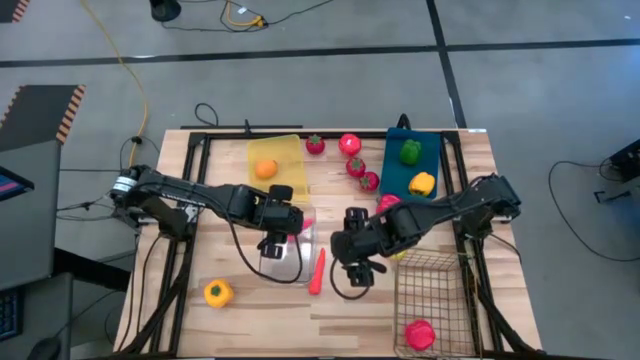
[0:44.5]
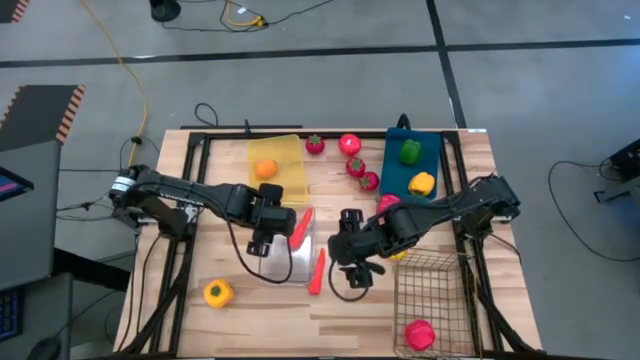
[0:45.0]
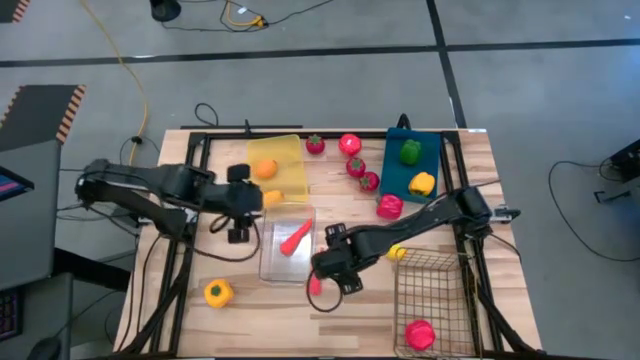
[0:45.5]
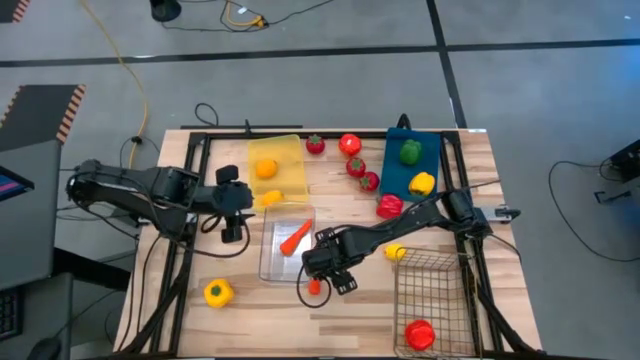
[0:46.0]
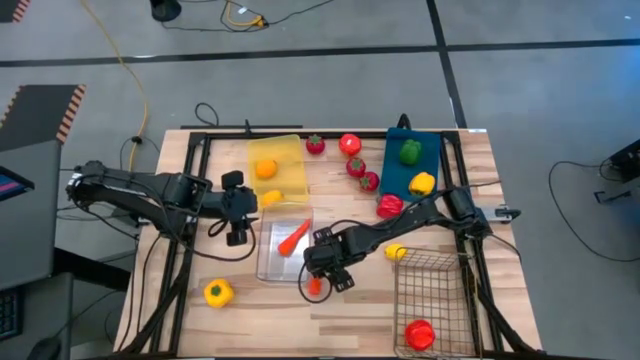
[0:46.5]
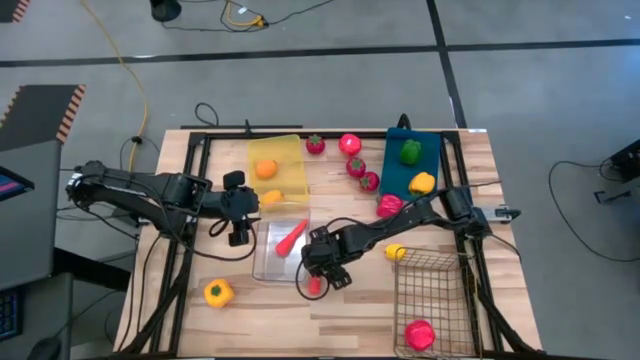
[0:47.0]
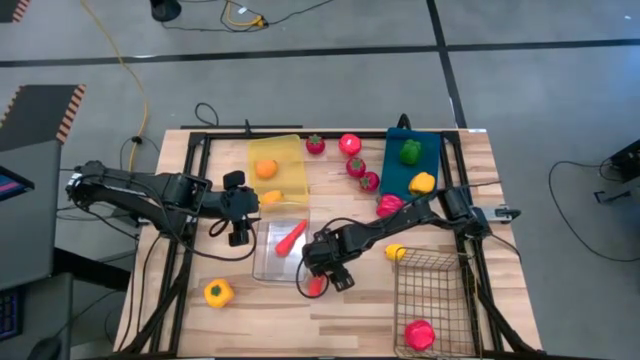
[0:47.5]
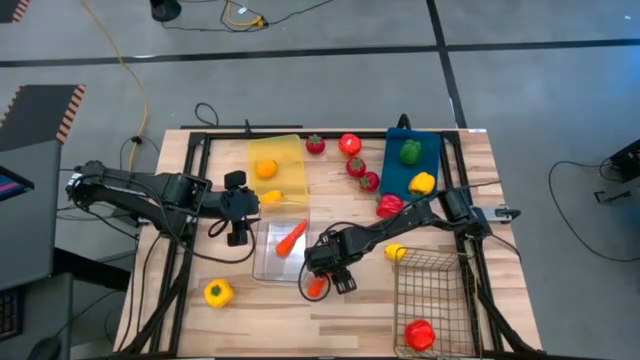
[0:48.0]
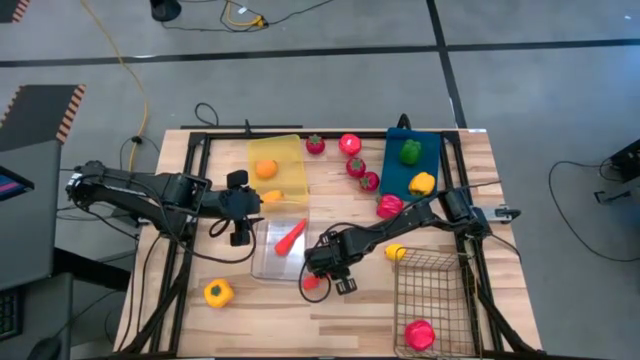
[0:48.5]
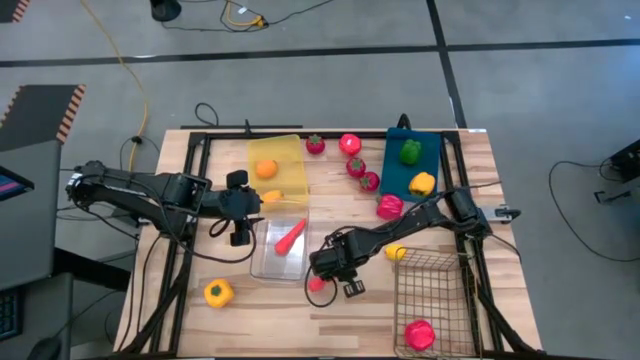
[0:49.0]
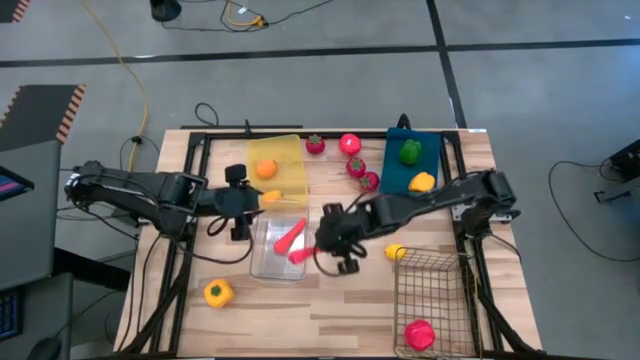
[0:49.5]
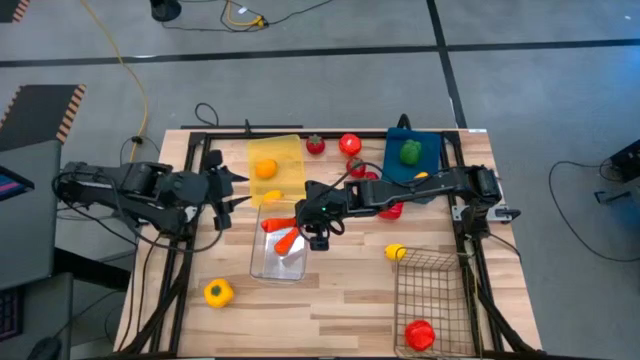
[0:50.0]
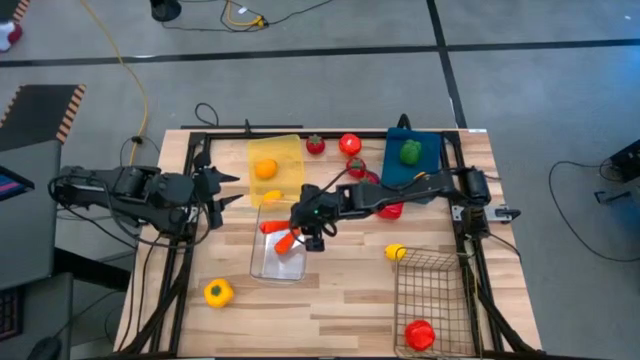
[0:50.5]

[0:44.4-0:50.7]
Task: Sort produce into baskets
Put the carrot into the transparent bin

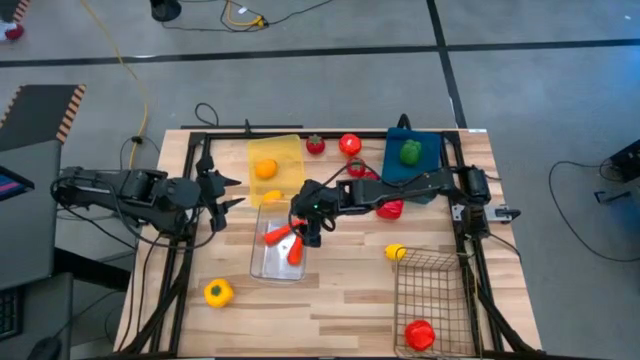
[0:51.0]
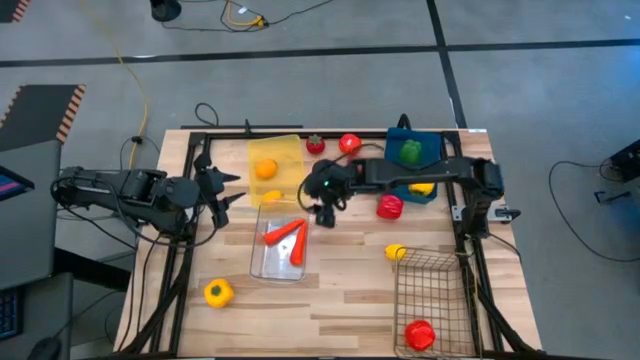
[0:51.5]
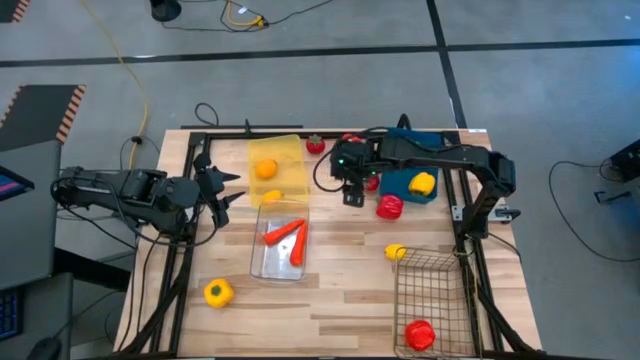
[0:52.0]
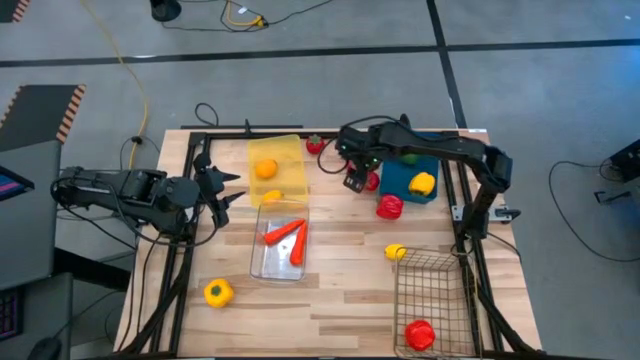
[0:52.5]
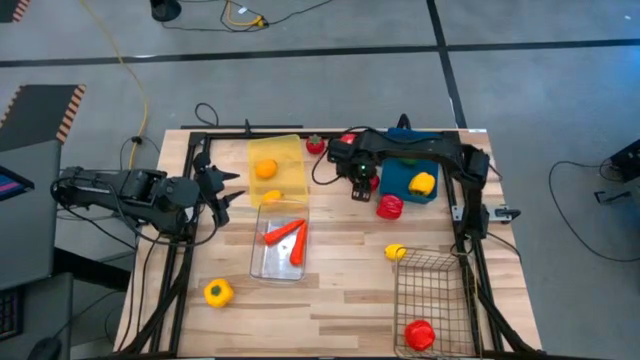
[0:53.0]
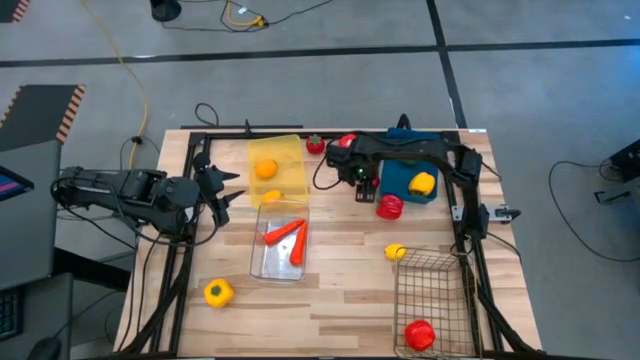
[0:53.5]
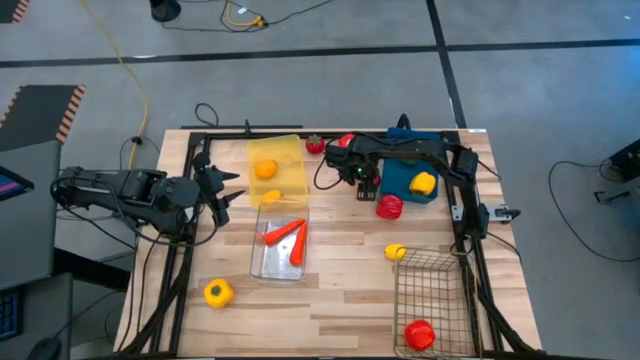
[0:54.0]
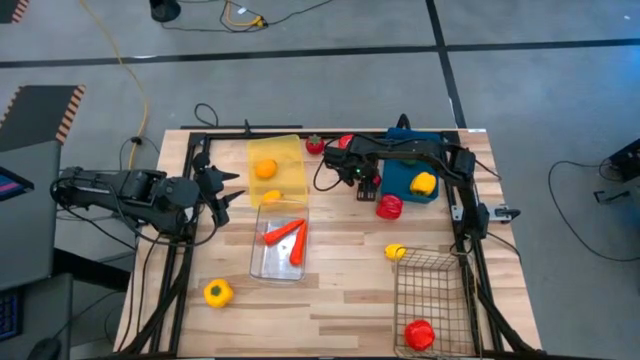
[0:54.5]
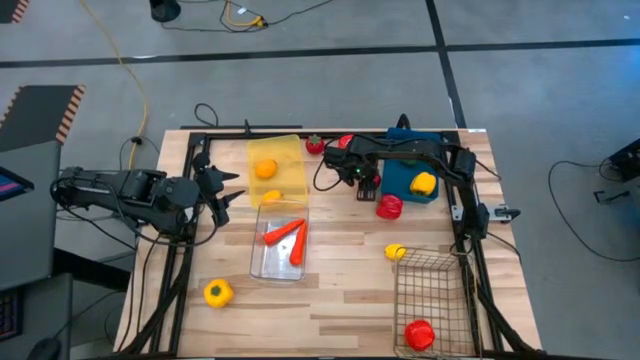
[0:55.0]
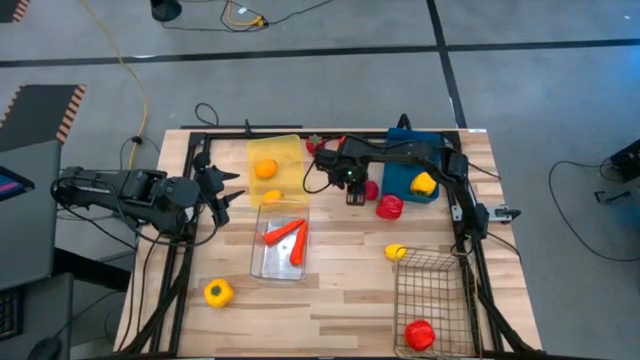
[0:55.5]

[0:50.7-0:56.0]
Put the middle red tomato into the wire basket

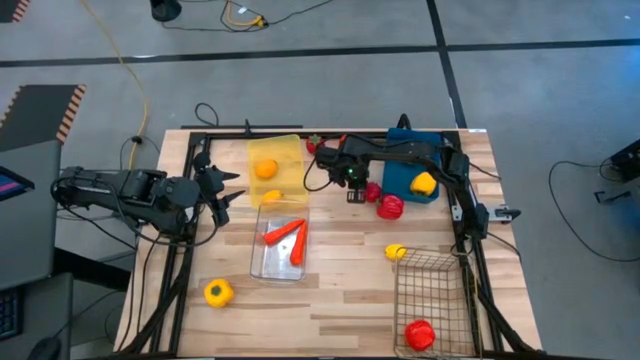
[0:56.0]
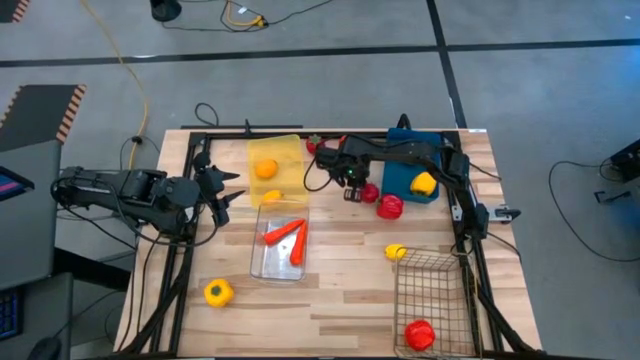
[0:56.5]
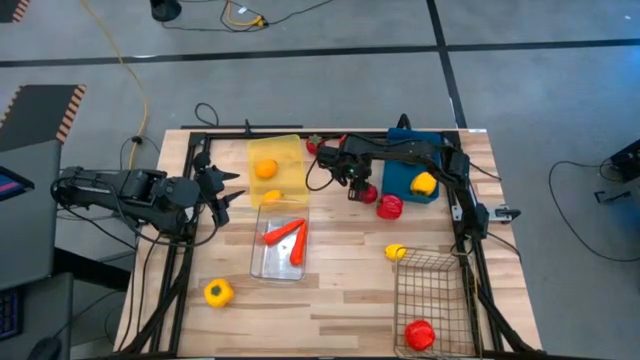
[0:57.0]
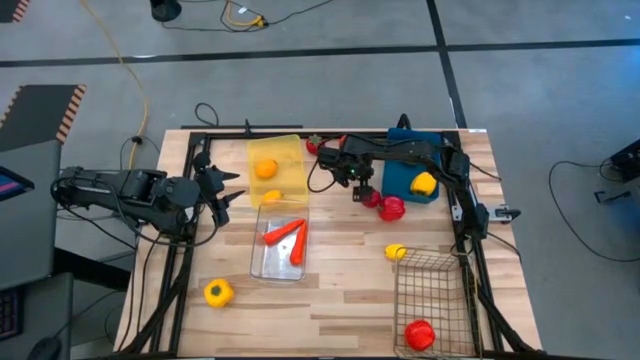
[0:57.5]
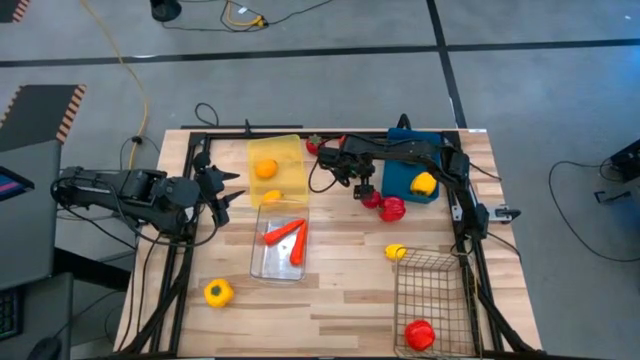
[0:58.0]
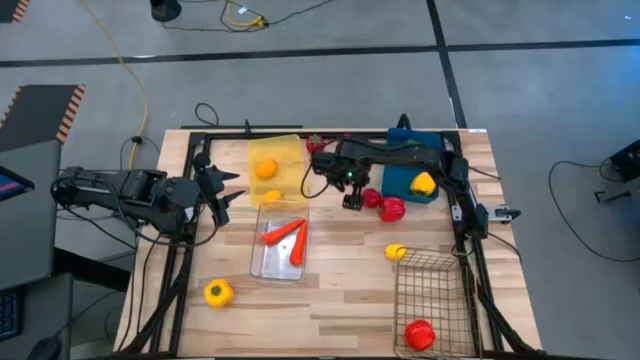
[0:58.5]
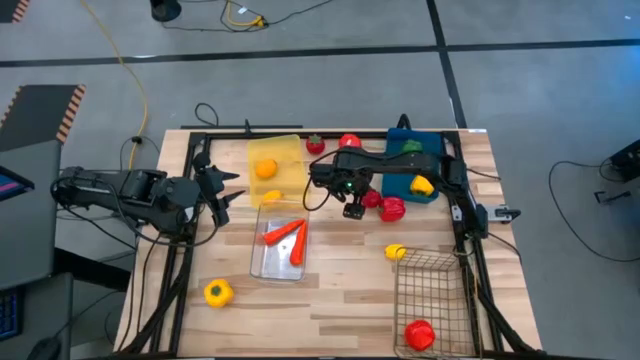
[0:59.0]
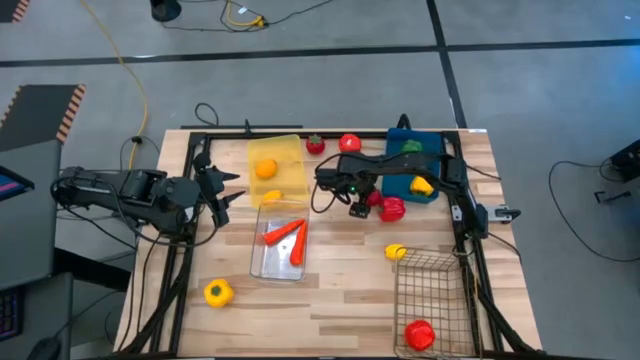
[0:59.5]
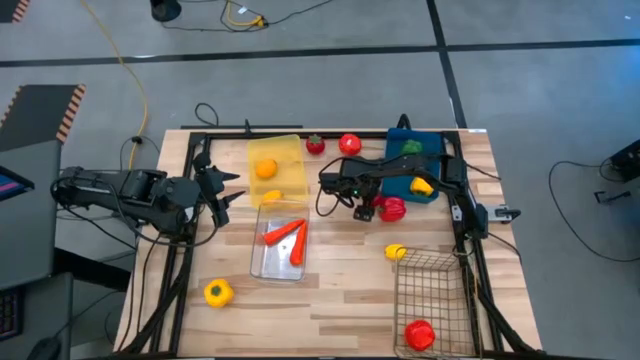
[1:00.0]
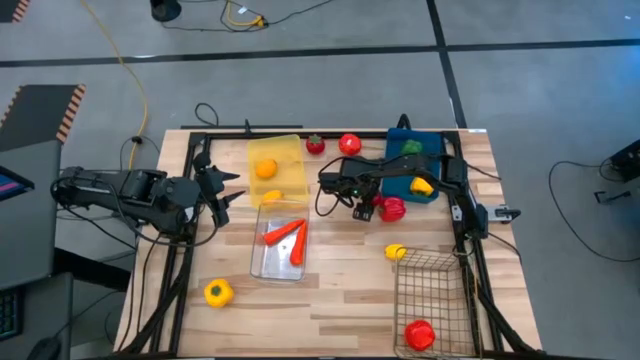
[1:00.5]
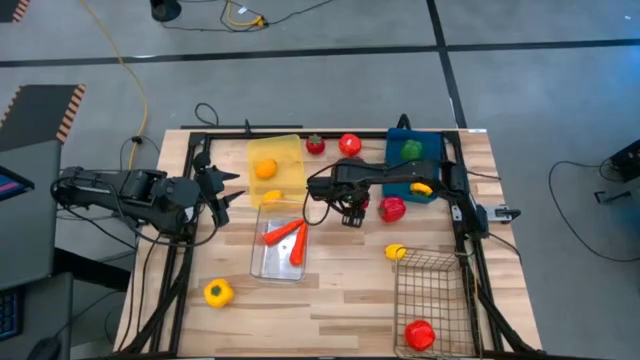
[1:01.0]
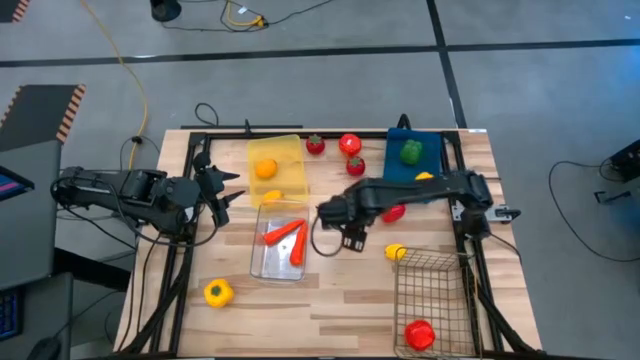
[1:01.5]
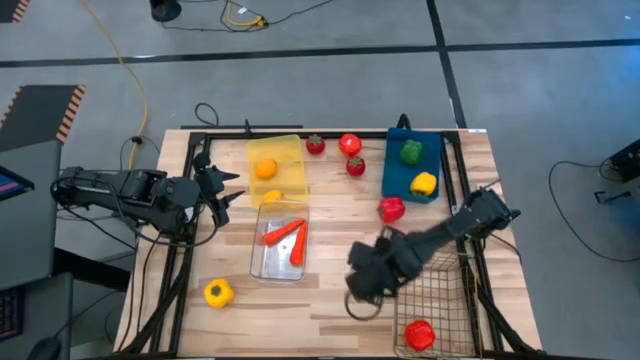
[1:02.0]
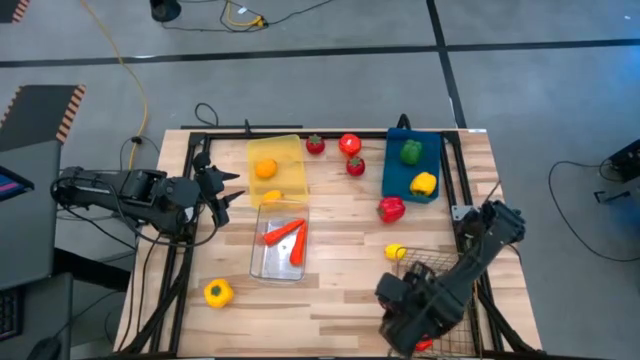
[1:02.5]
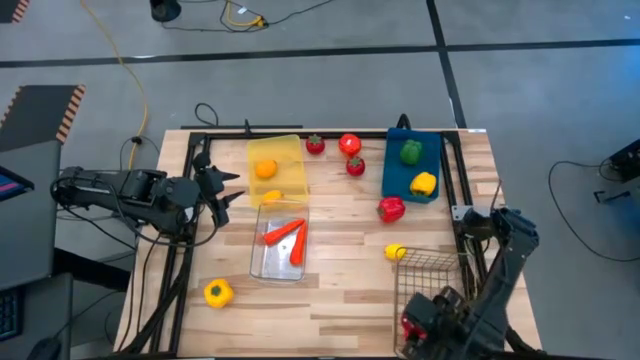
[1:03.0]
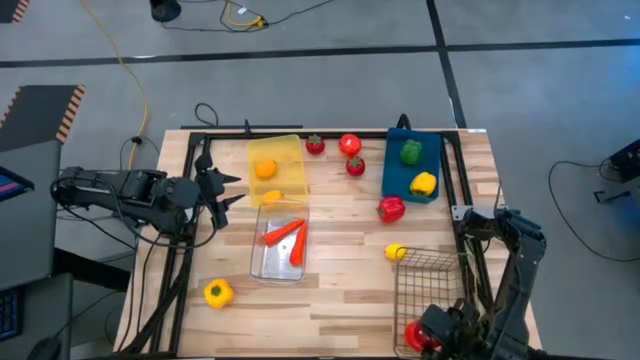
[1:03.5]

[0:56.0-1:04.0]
Put the middle red tomato into the wire basket

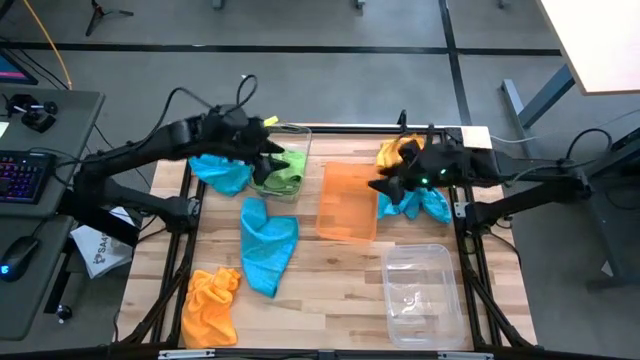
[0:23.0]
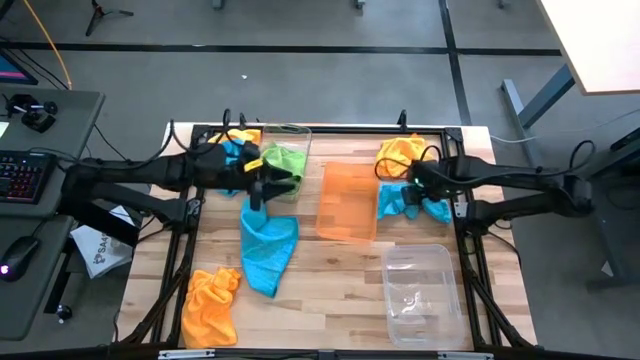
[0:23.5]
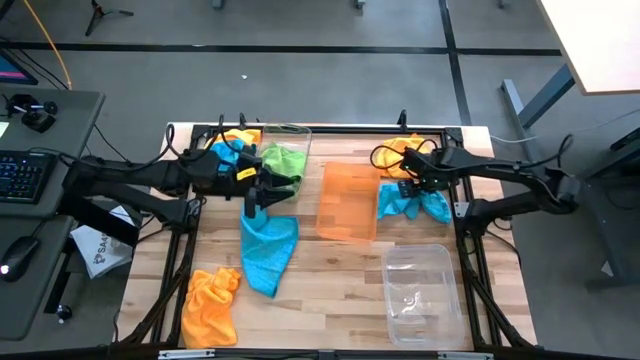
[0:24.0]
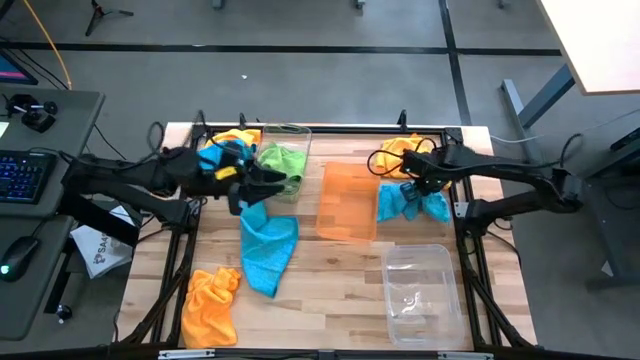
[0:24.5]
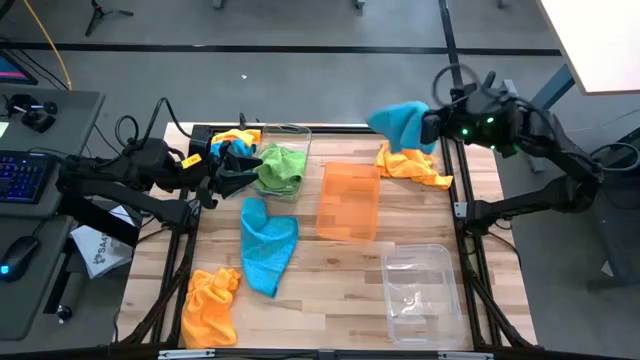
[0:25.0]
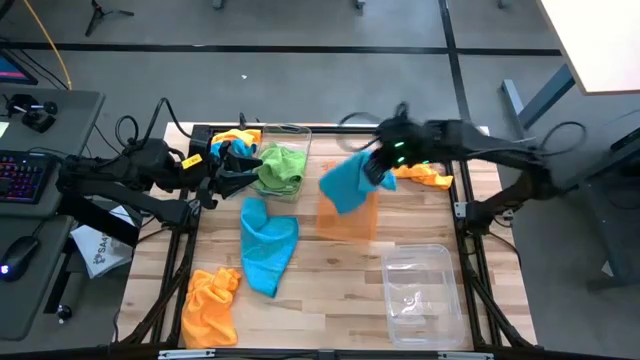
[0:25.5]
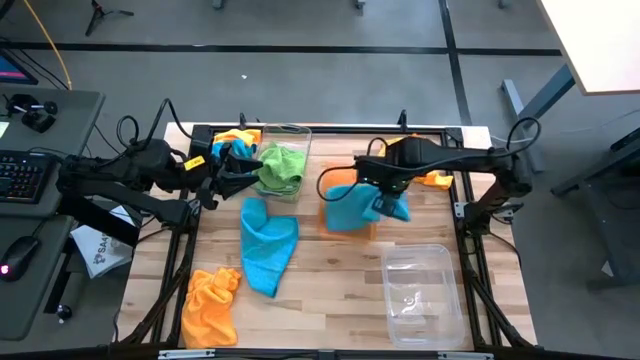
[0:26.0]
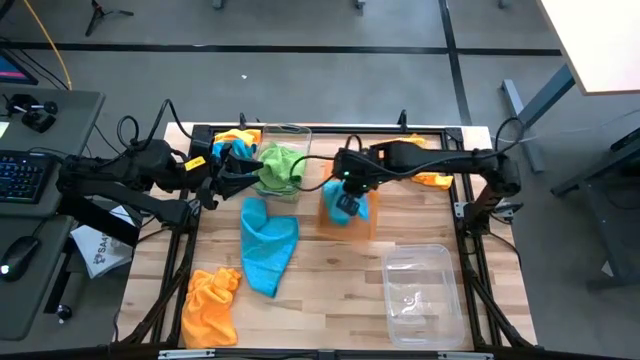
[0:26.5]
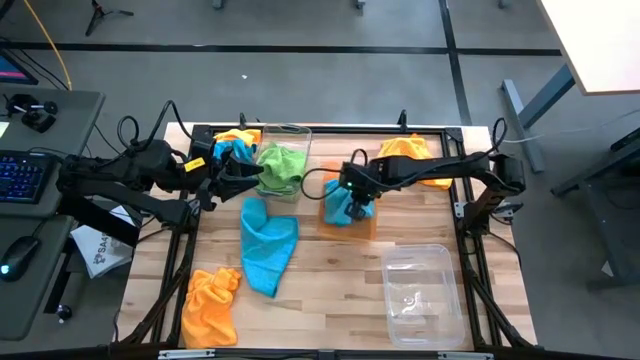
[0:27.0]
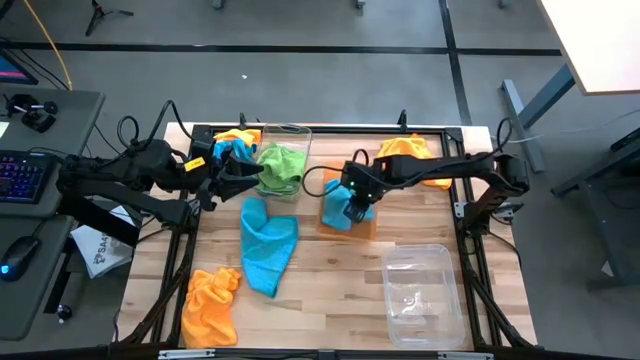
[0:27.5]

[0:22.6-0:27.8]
Task: Sort microfiber towel by color & place in baskets
Put the top right blue microfiber cloth into the orange bin
